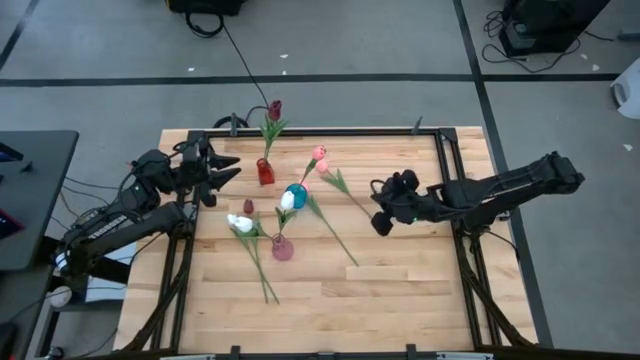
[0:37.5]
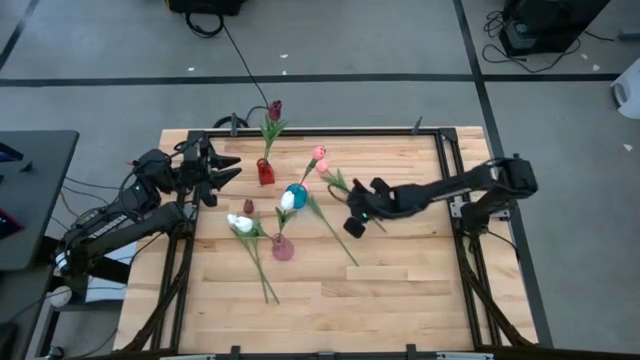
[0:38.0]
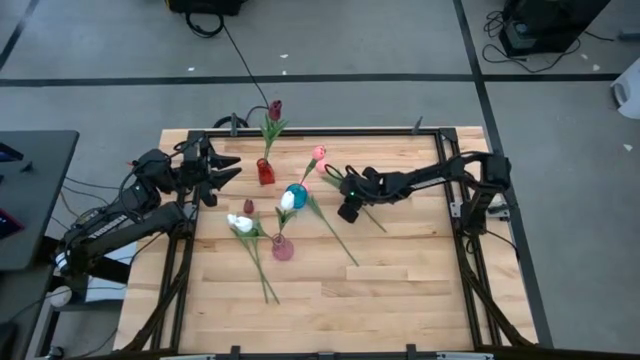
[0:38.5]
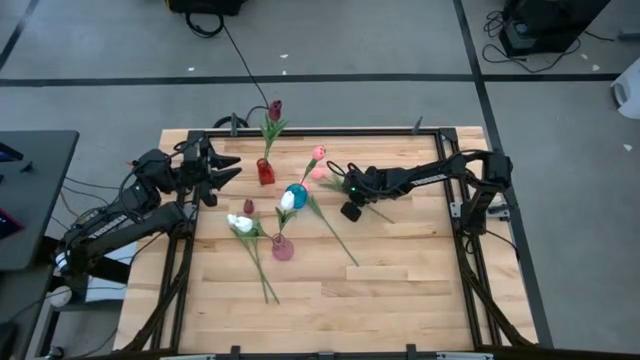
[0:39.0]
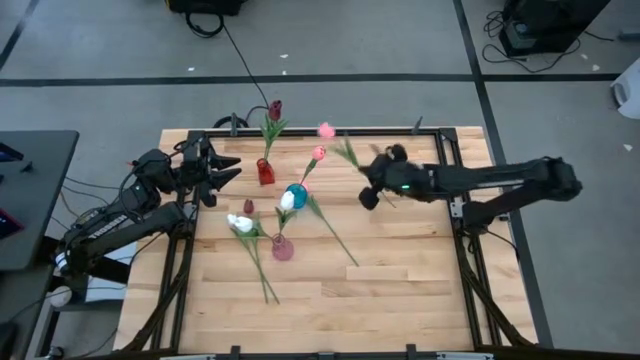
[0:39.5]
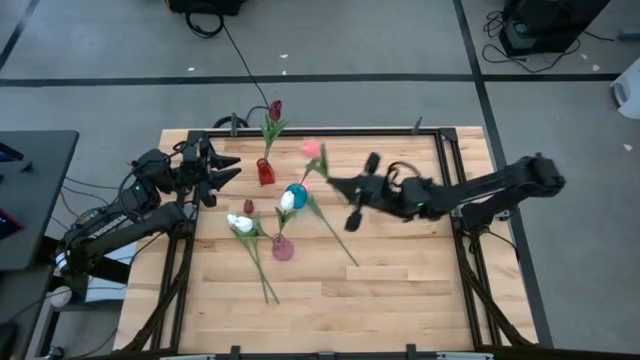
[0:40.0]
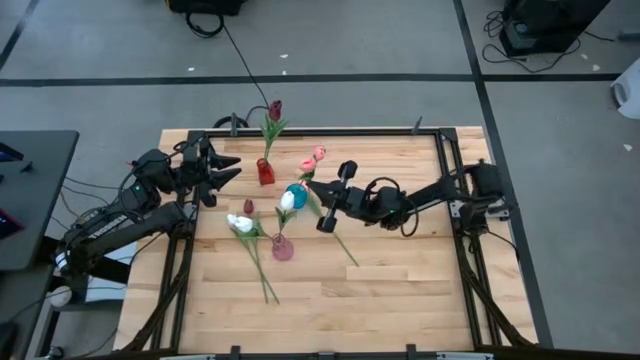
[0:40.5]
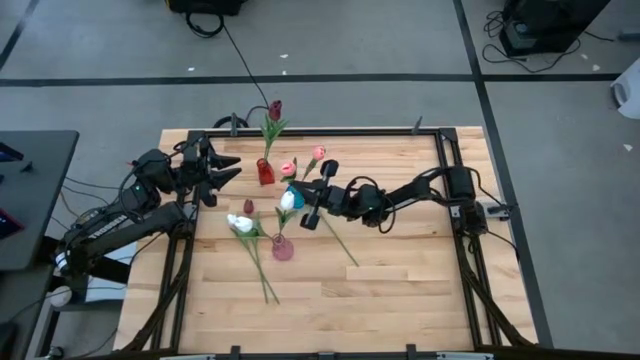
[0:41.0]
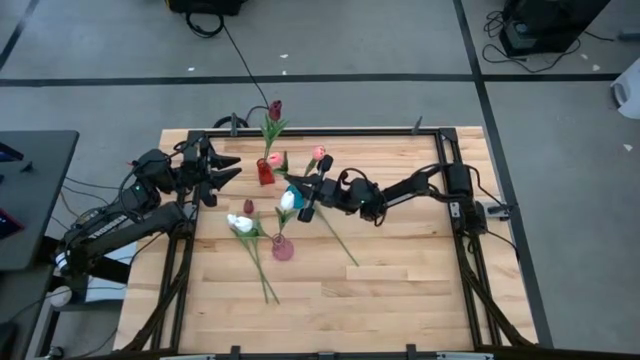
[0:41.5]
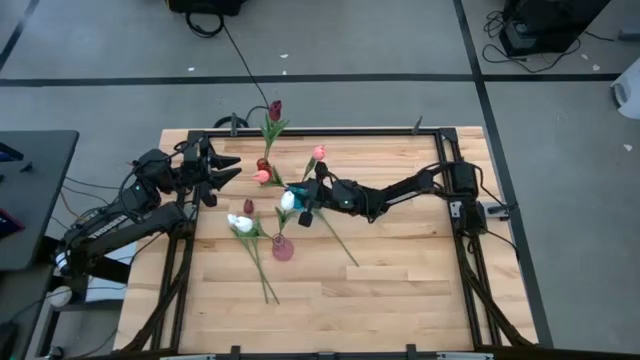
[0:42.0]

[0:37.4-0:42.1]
Task: Sort flowers into vase by color
Put the top pink tulip into the blue vase

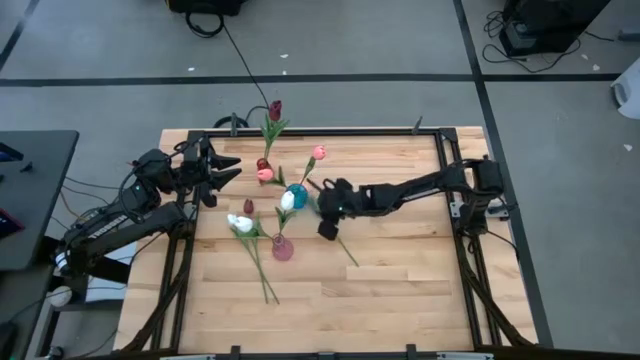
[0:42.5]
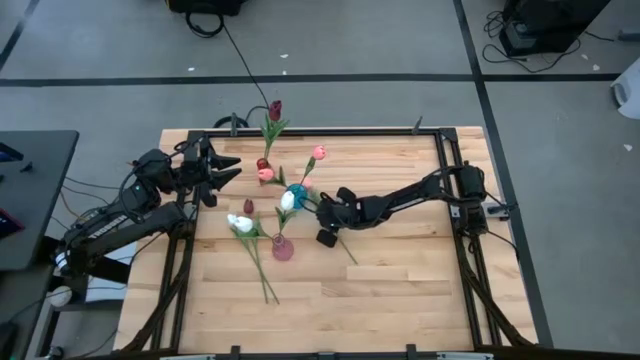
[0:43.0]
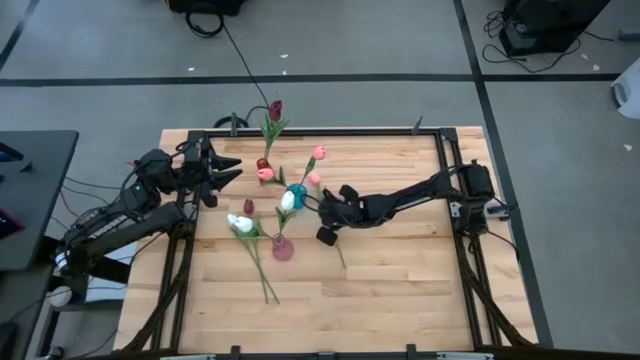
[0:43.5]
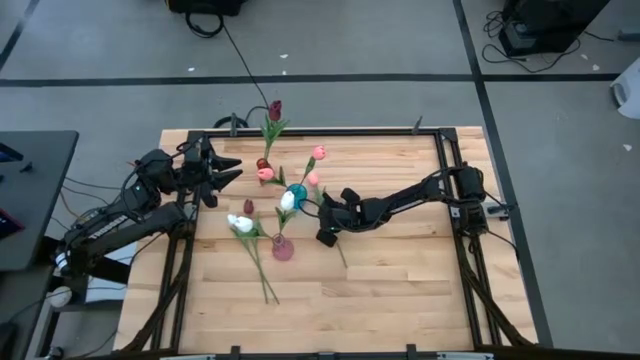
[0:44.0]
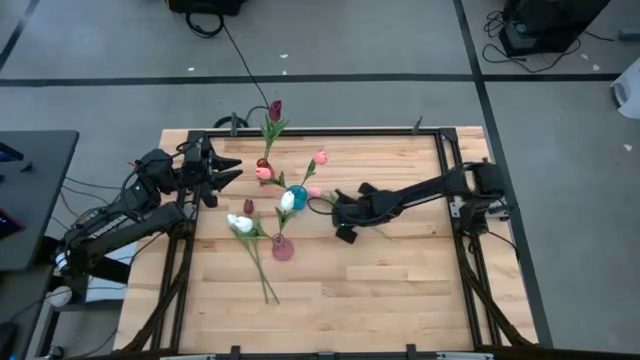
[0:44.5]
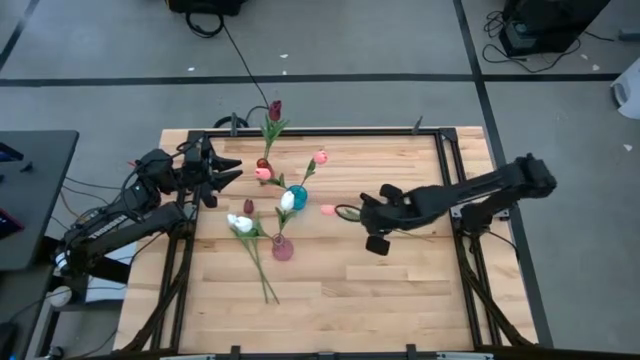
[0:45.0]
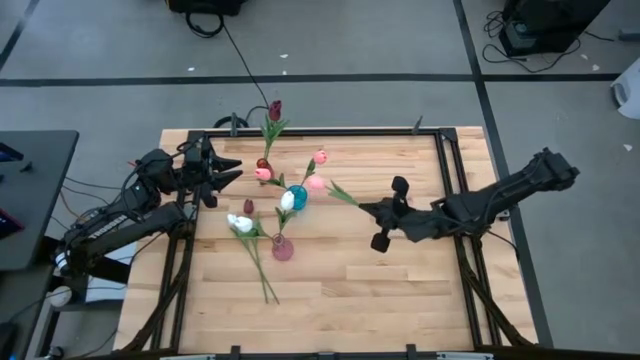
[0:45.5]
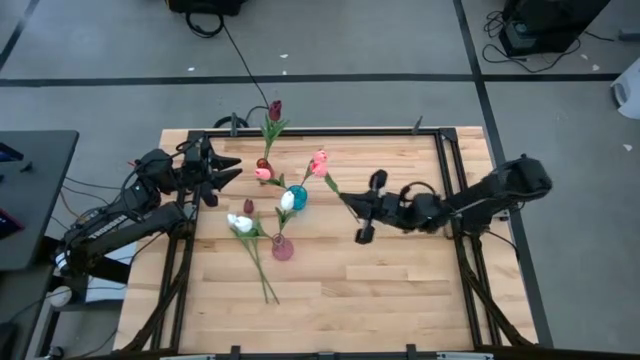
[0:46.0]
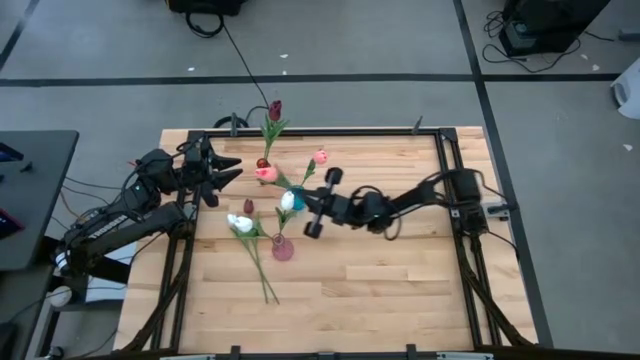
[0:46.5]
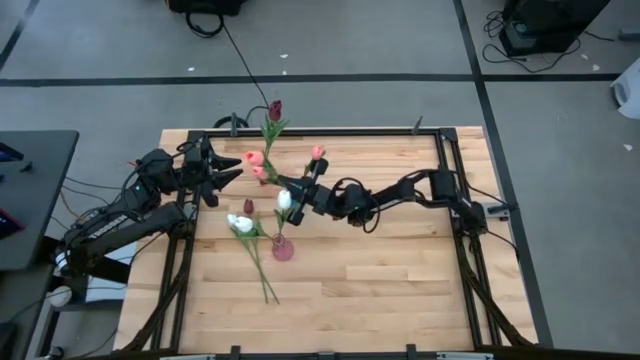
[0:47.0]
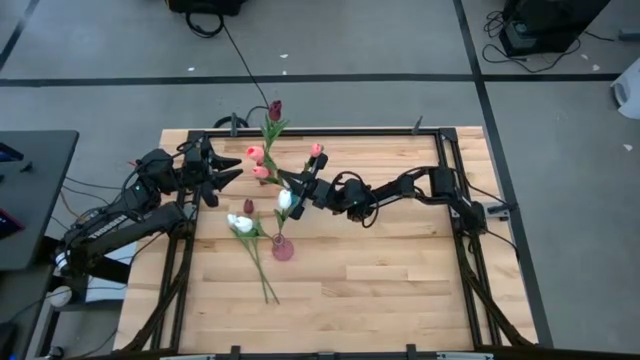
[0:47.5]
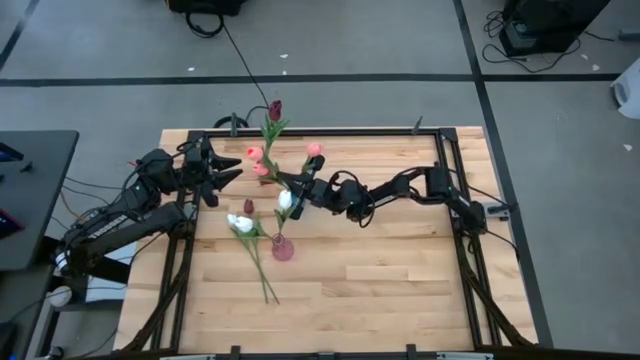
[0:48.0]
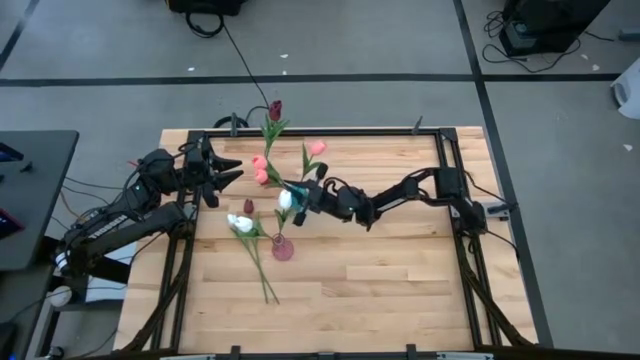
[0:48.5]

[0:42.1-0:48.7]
Put the pink tulip into the blue vase

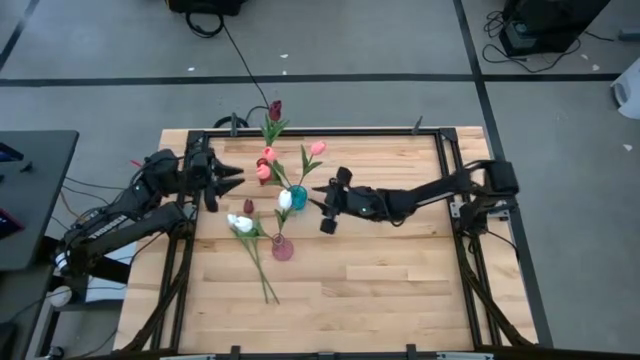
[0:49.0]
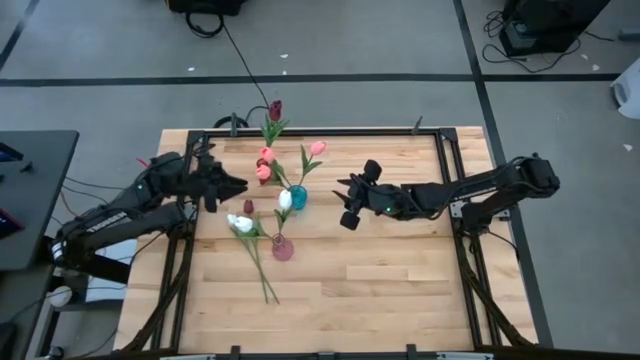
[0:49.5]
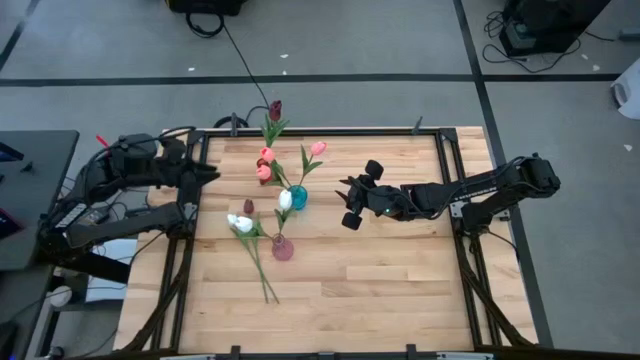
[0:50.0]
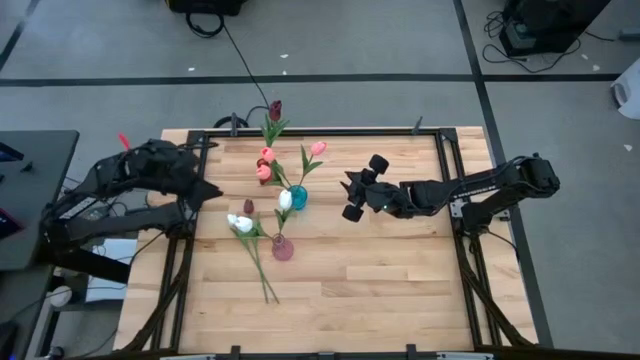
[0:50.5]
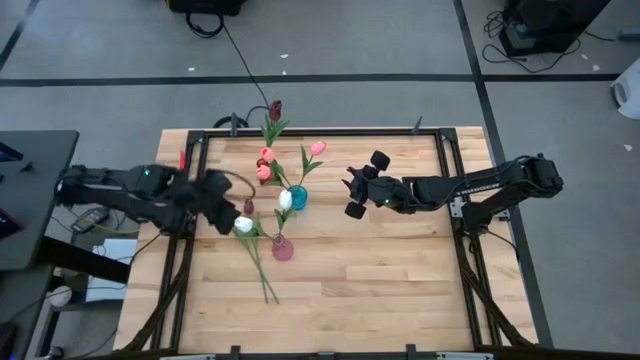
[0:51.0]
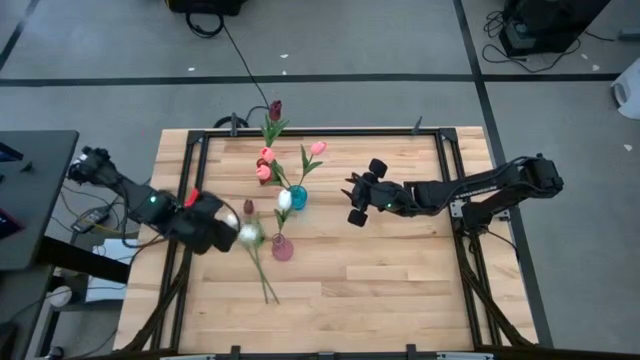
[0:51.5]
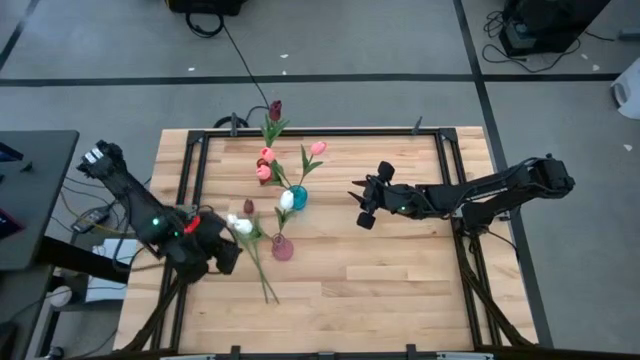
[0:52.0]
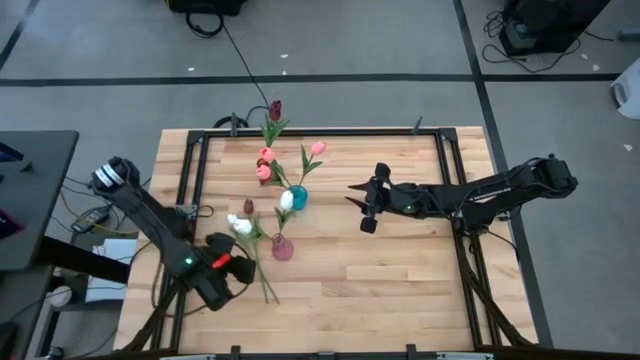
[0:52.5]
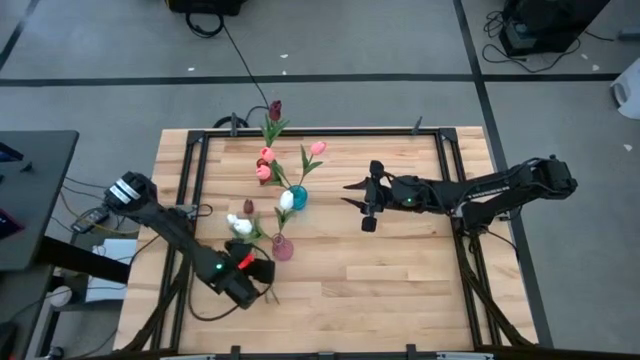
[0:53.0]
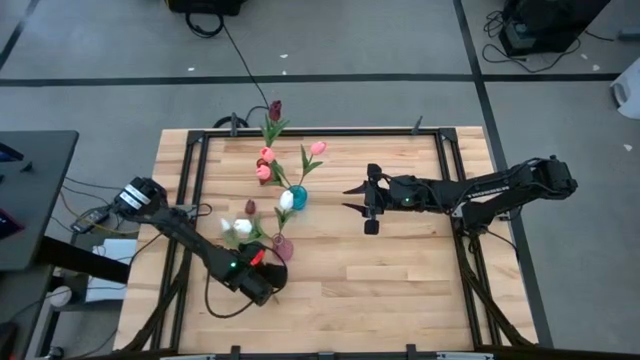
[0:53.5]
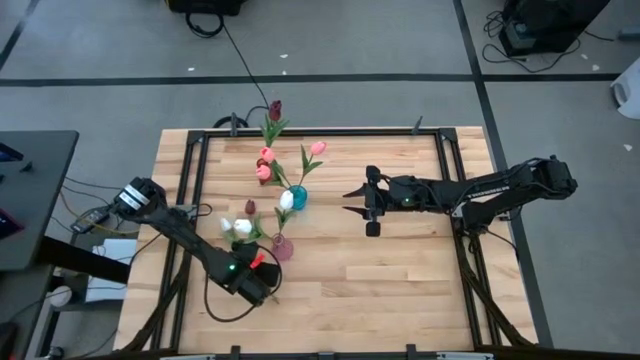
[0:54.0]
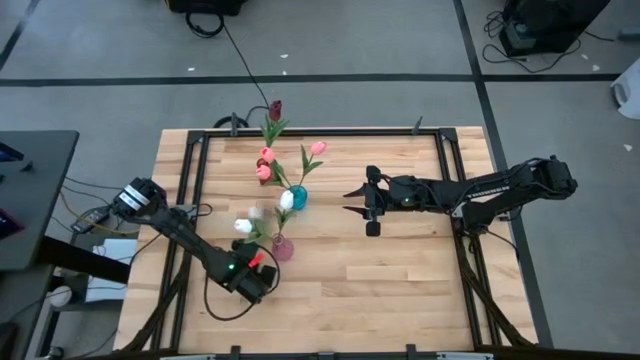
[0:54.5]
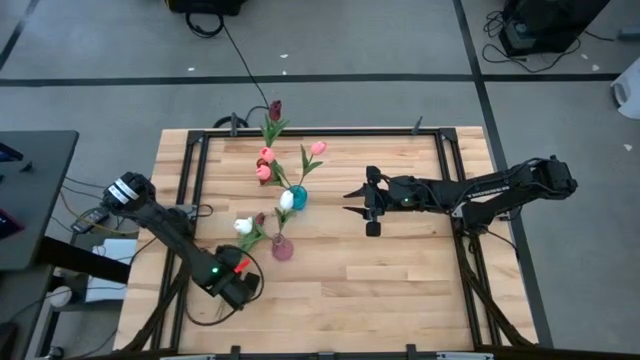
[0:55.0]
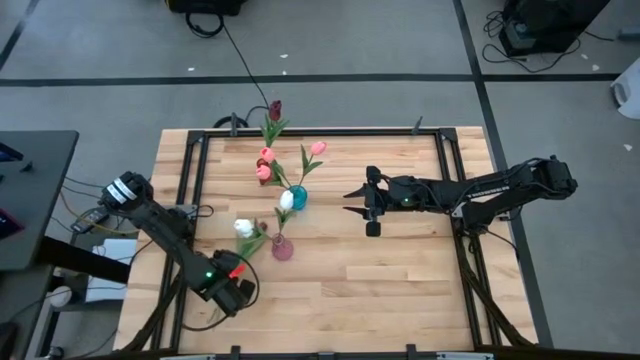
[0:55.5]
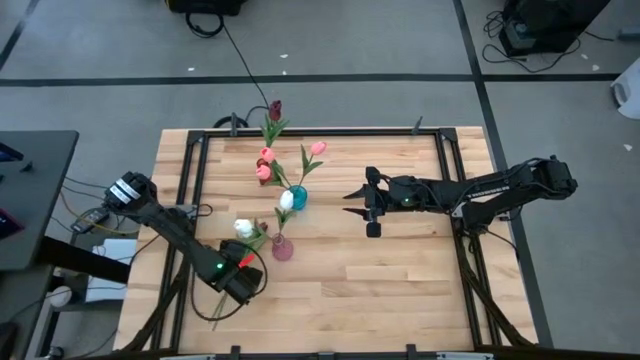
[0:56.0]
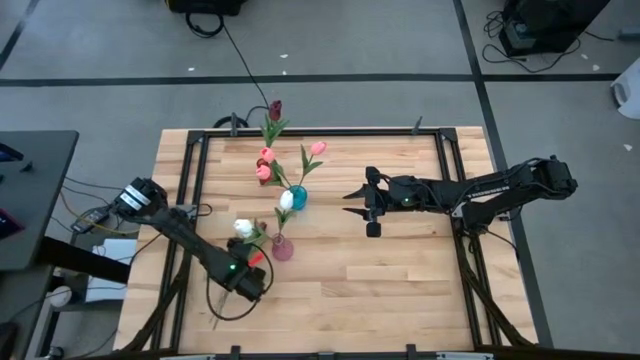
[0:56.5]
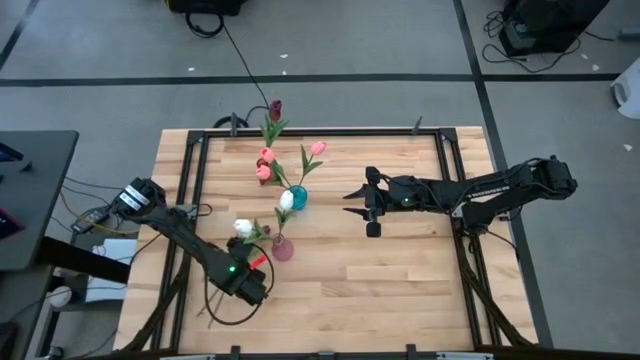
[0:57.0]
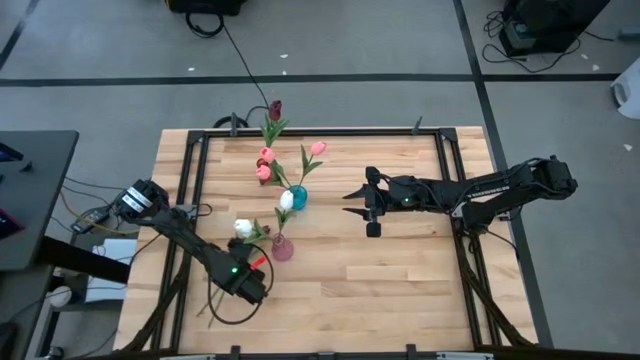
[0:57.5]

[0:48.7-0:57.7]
Put the red tulip into the red vase
